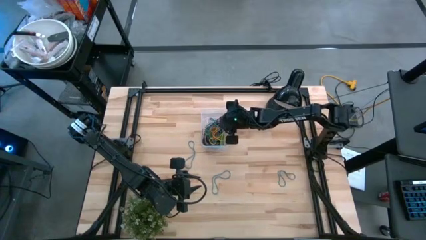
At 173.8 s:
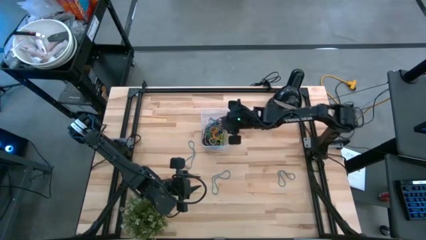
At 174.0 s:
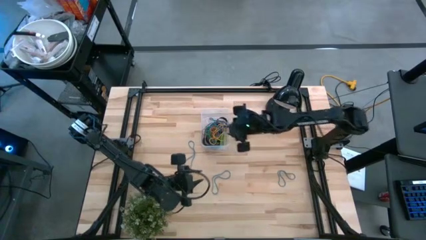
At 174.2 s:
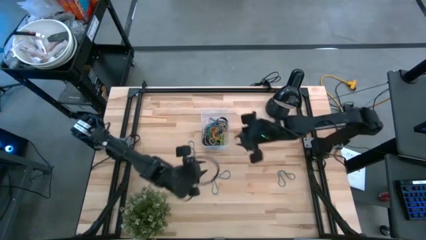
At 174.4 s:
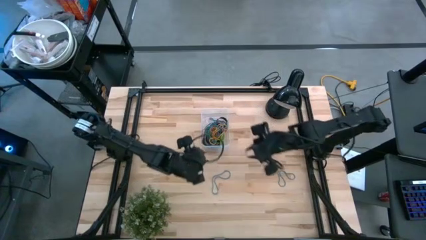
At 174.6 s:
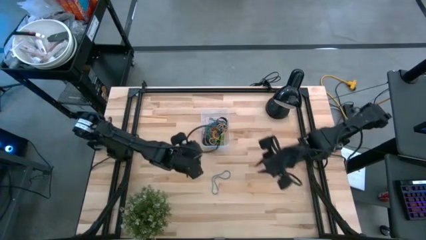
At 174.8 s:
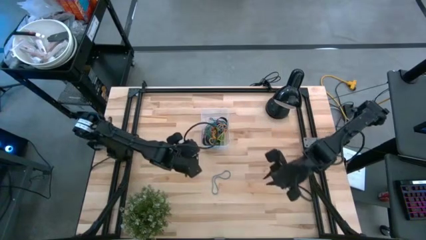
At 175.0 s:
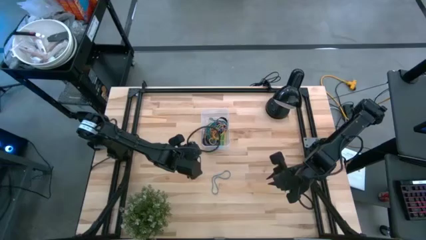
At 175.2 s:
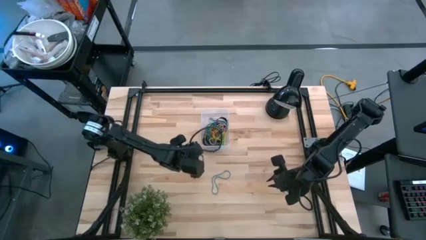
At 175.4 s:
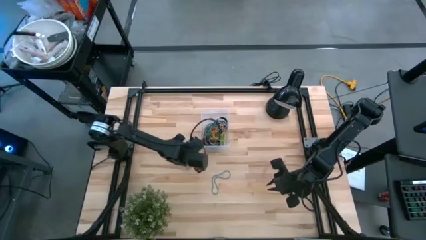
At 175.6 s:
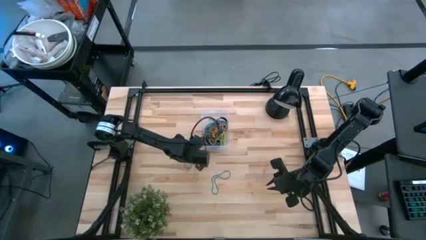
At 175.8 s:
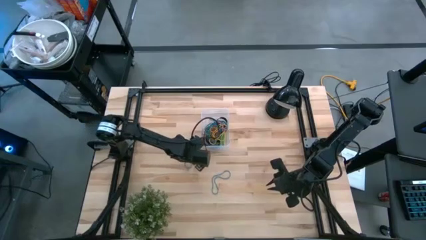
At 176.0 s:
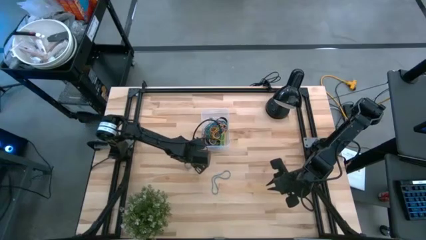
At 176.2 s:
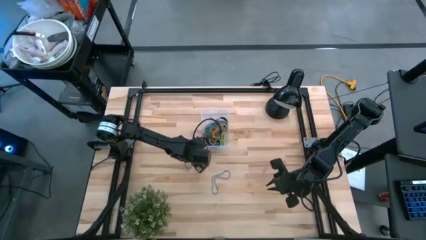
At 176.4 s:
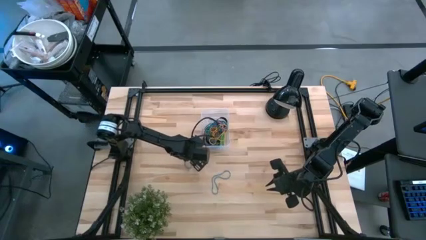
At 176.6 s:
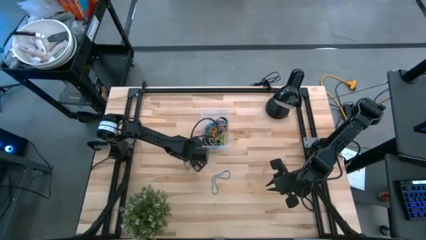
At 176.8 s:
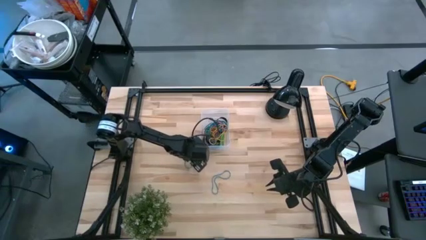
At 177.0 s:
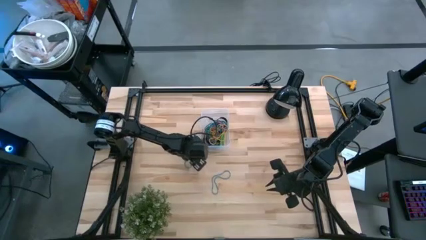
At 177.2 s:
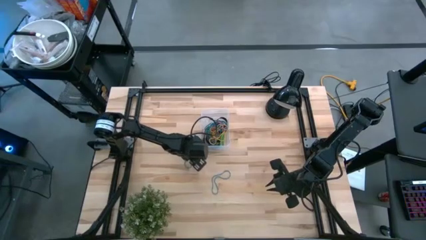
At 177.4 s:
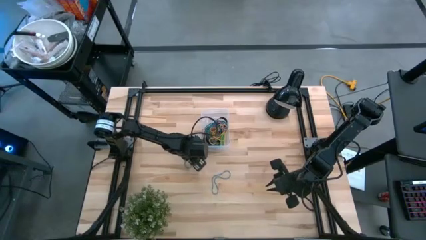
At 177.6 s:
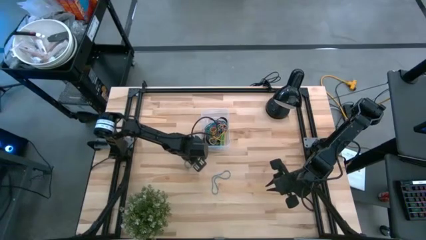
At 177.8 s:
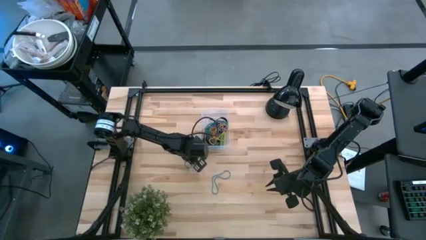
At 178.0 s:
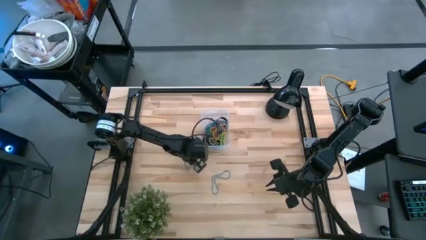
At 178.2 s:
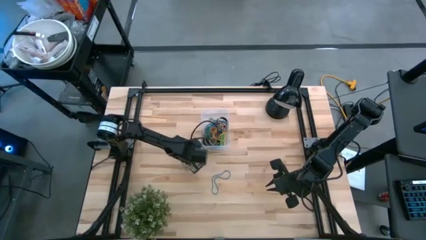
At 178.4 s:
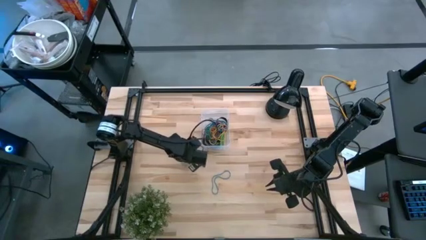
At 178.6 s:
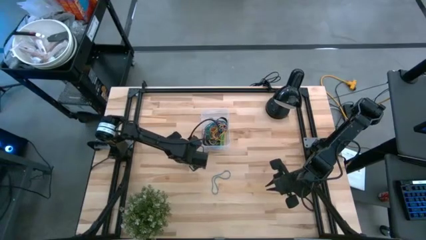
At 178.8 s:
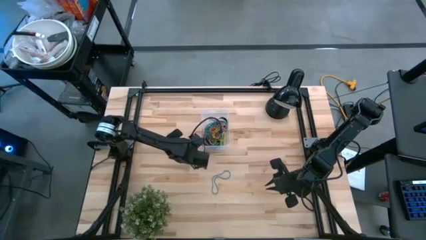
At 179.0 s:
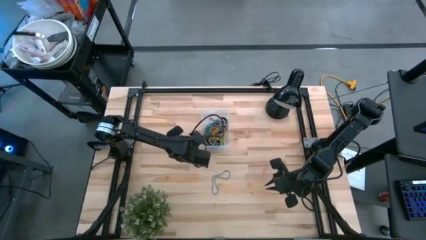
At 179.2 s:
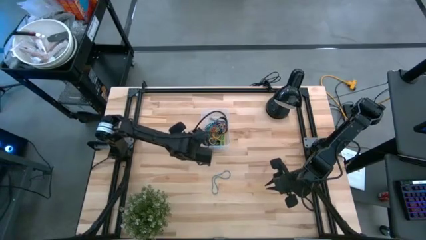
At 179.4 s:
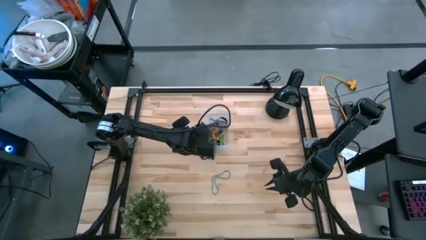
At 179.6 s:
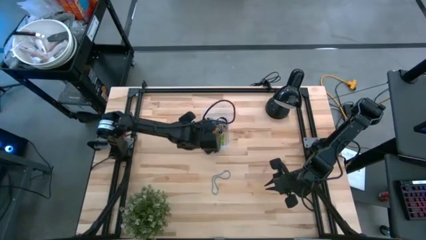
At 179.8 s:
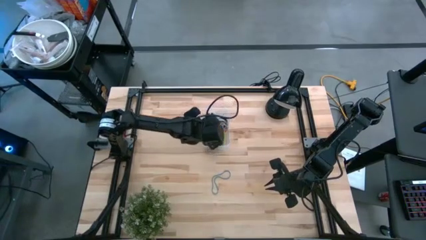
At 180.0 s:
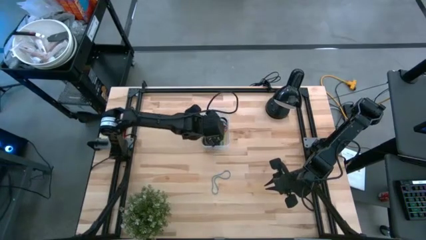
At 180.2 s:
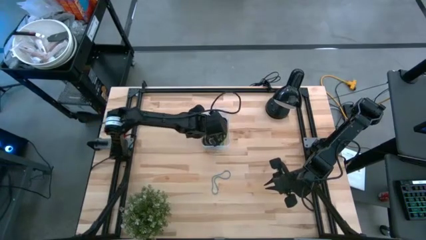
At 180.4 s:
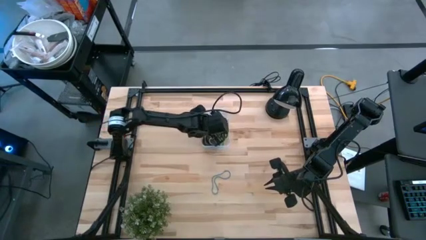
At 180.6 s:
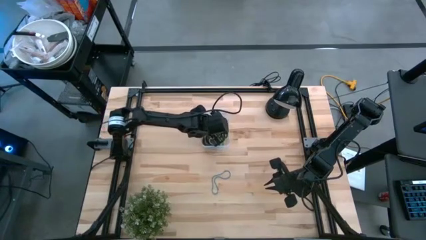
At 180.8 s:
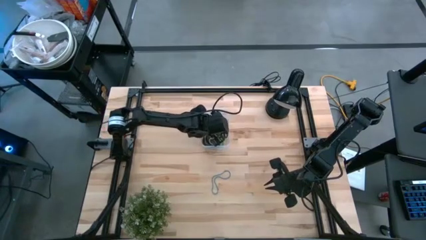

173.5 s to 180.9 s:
Task: Pick and place rubber bands into bin
Put the blue rubber band into the transparent bin

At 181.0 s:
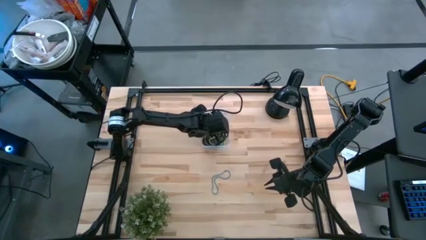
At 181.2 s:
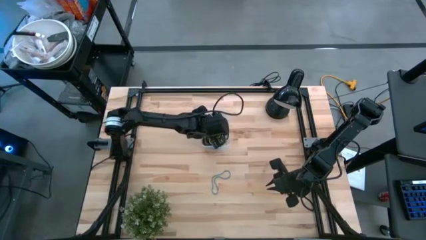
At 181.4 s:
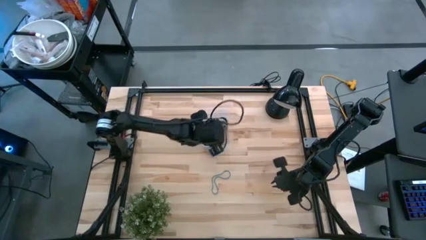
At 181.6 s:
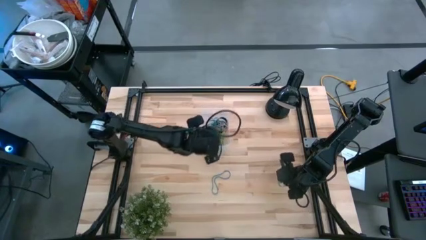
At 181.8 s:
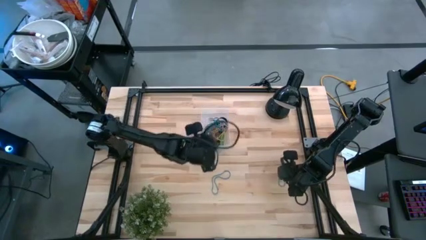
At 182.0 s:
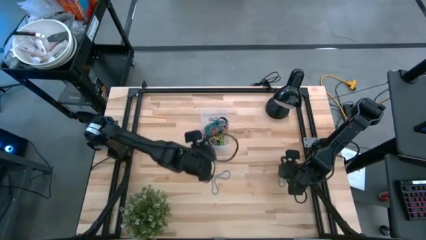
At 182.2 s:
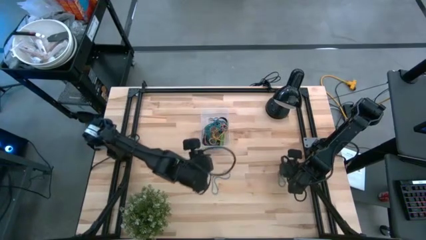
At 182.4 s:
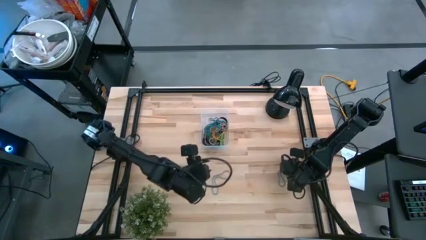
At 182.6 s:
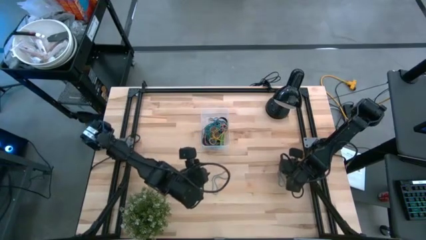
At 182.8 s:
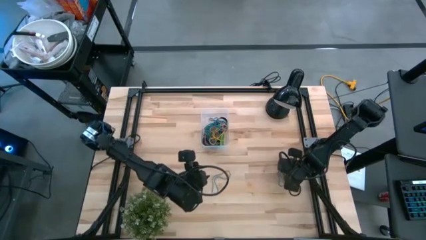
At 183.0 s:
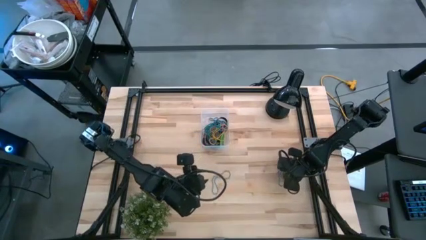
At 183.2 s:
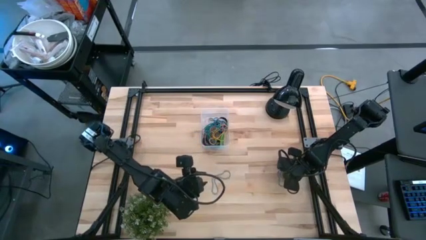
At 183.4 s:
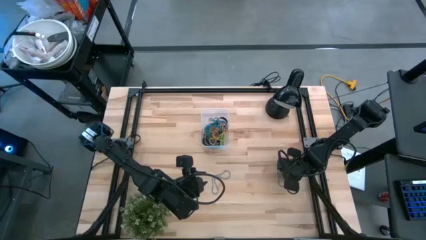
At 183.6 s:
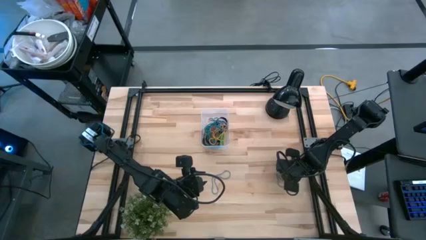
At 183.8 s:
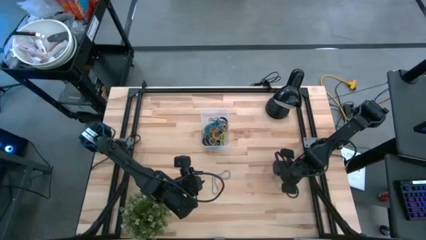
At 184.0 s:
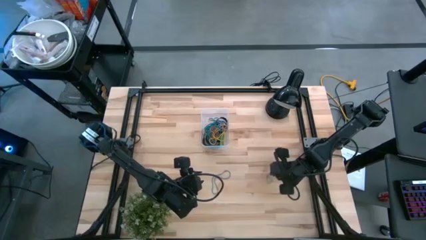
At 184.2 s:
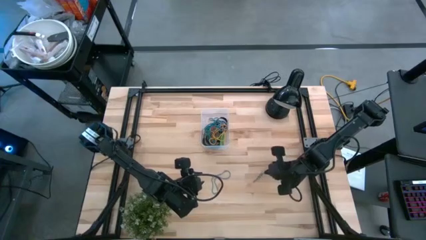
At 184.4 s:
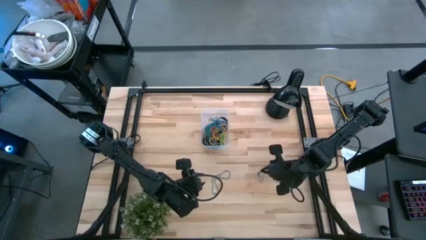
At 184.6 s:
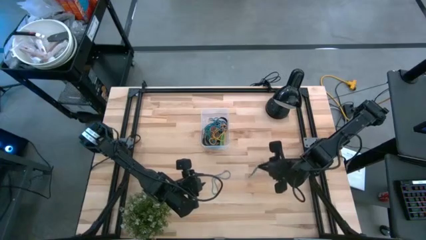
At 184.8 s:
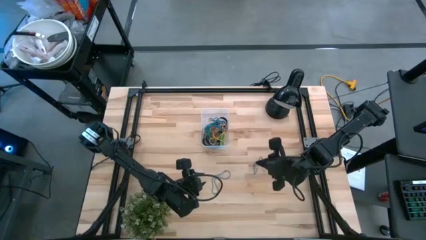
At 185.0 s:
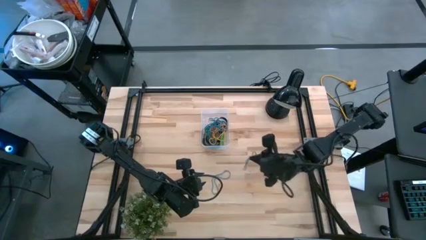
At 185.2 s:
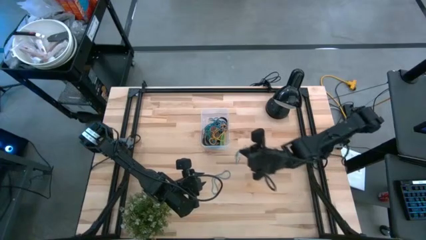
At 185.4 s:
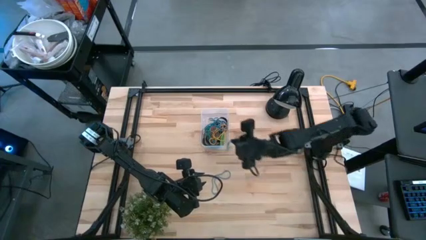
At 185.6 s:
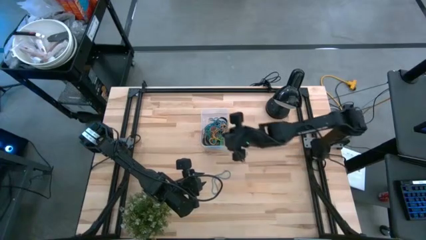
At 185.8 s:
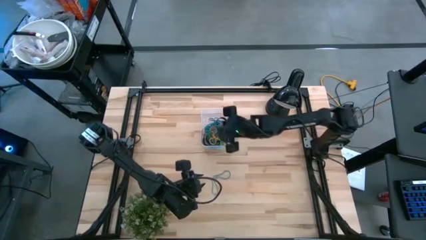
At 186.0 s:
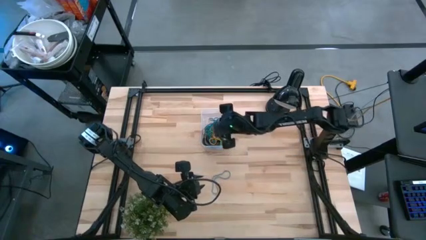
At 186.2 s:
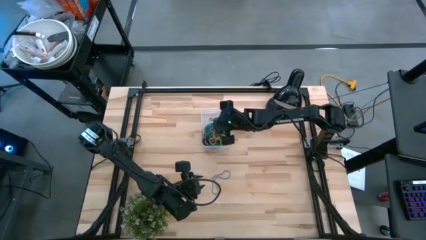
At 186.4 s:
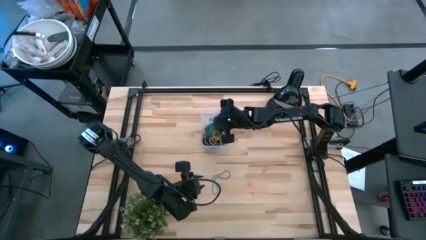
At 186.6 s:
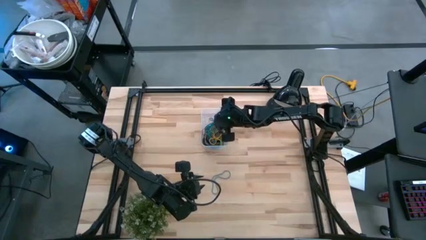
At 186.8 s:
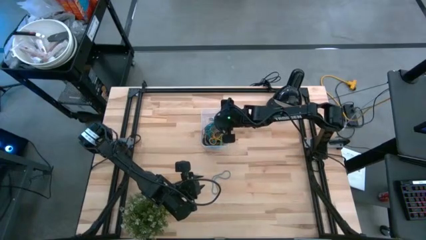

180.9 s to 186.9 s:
Put the blue rubber band into the transparent bin
